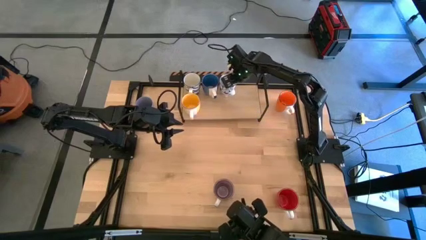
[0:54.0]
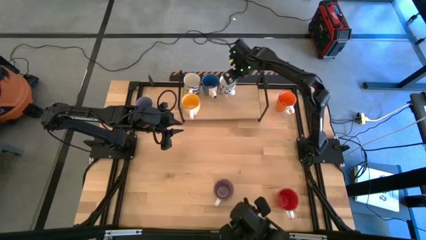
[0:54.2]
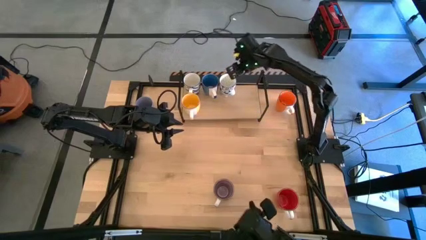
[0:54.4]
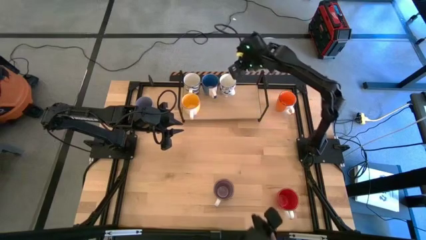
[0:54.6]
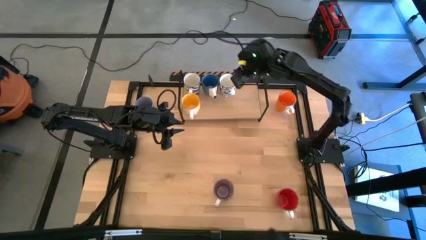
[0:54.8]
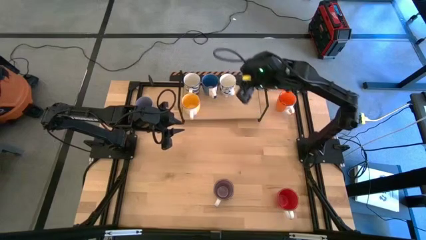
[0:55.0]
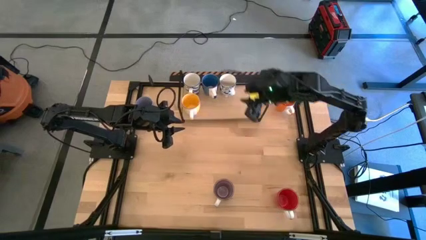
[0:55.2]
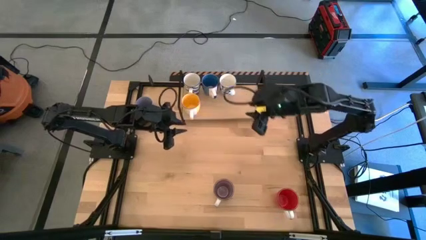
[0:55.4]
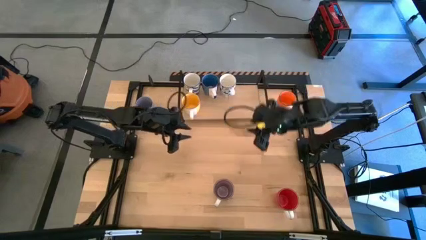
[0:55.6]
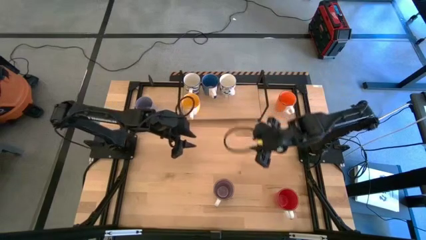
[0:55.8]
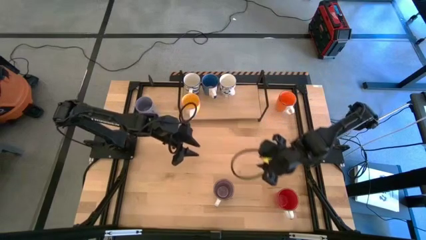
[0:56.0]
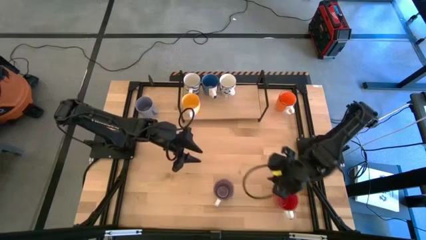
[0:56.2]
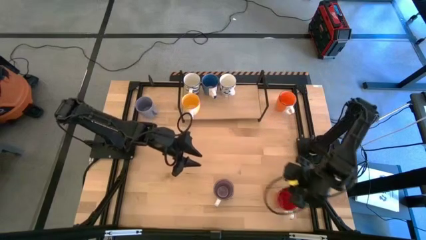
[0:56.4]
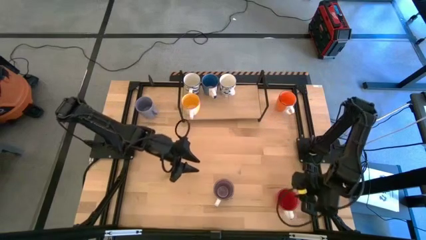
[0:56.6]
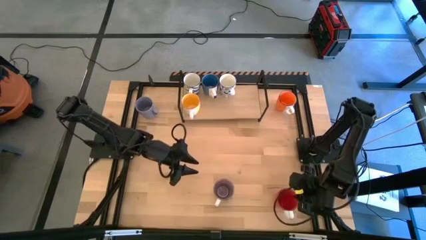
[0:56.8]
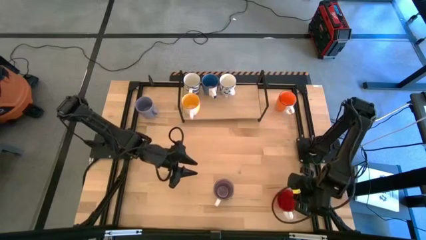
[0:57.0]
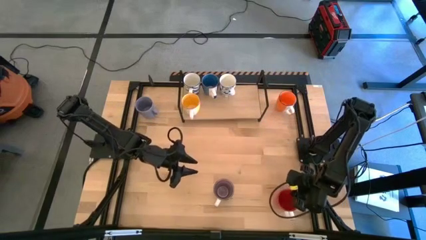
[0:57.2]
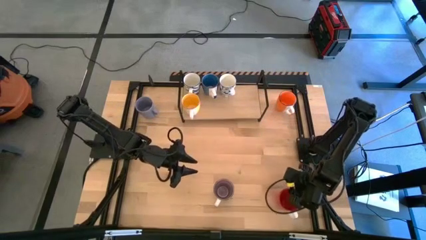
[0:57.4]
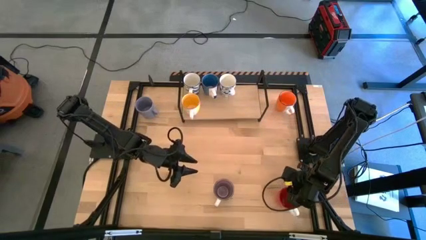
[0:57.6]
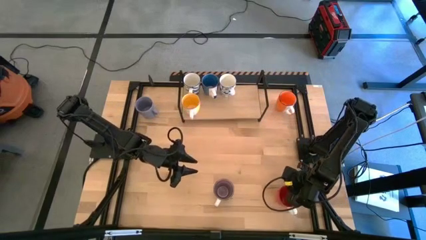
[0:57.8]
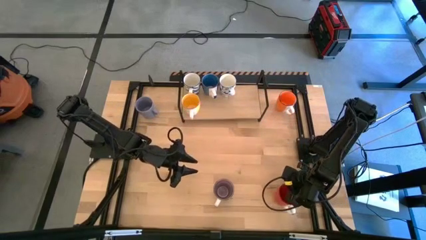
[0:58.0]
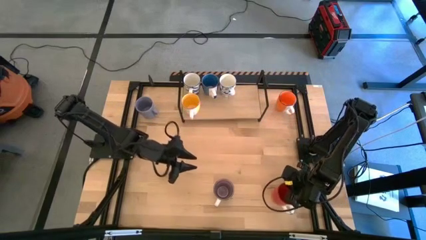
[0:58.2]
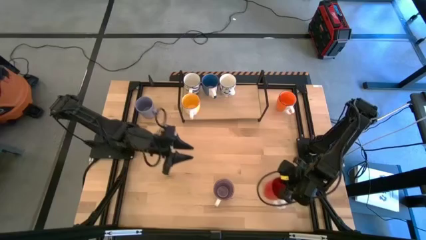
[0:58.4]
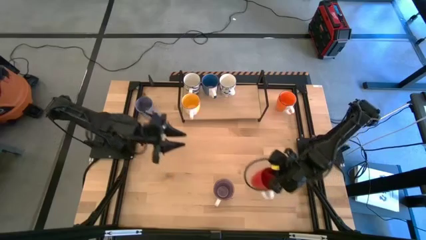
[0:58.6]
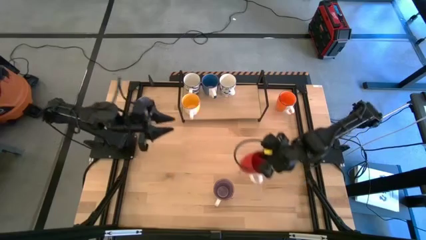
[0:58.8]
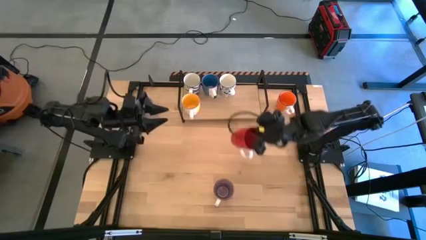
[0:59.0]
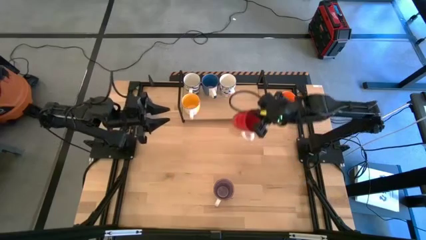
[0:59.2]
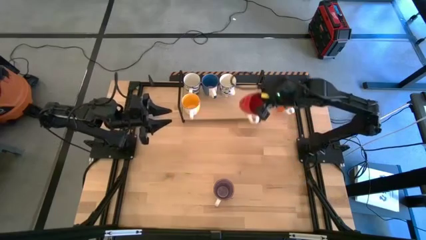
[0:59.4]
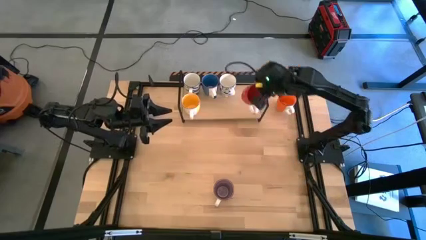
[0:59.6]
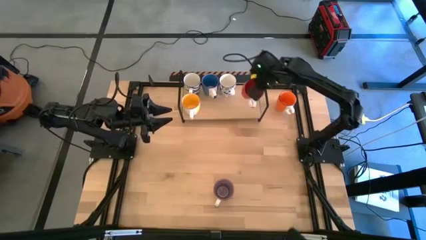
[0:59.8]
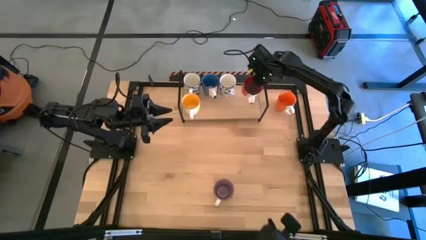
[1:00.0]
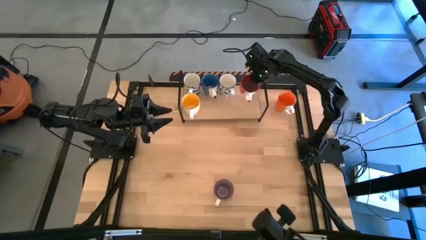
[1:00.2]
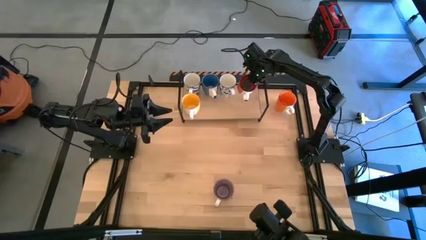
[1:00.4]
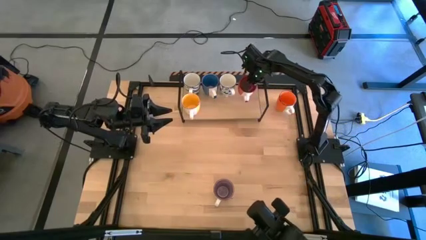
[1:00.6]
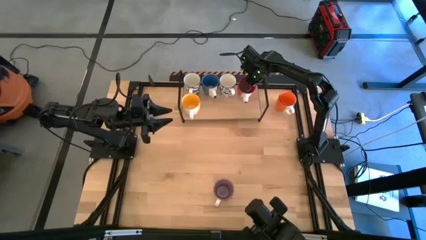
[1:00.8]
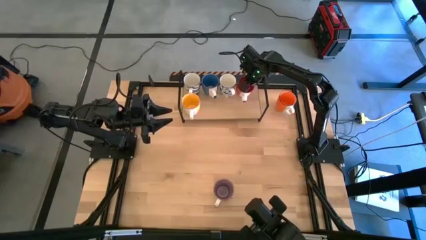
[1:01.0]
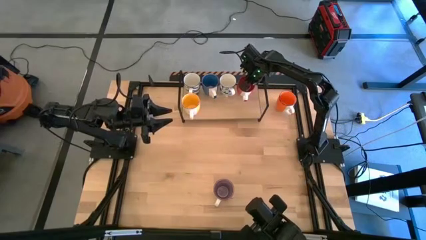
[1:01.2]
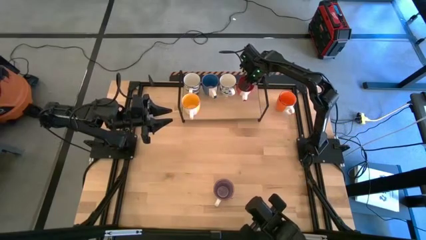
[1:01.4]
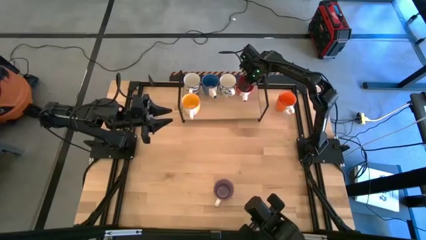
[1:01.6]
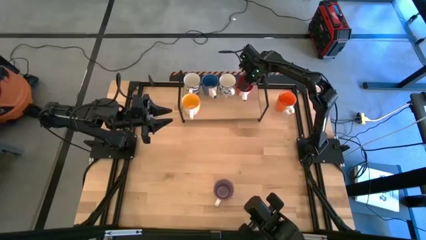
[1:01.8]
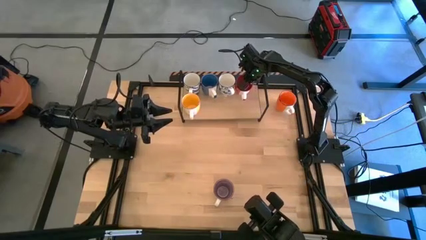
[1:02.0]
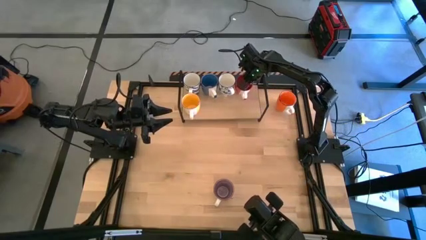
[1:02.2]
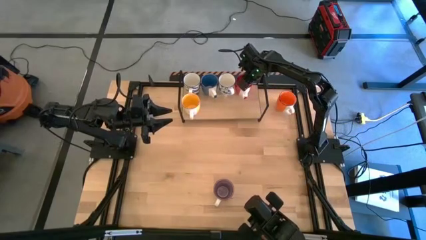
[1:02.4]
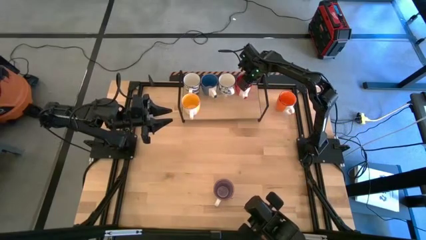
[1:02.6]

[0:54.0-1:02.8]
Task: Place coffee mugs
Put the red mug on the shelf

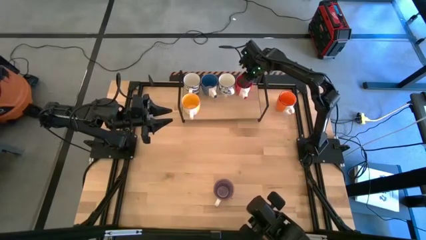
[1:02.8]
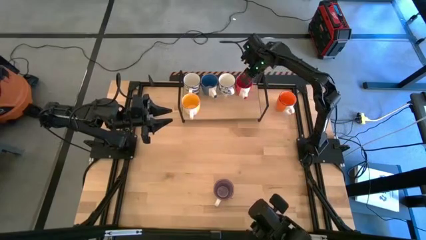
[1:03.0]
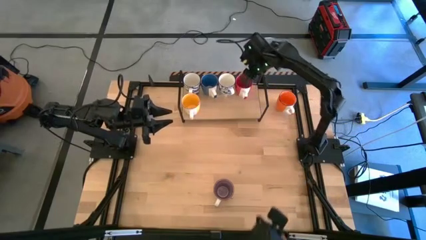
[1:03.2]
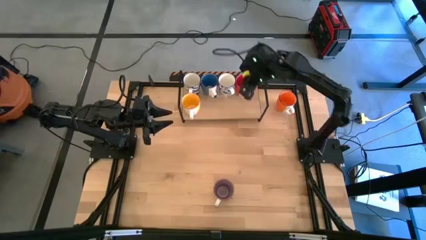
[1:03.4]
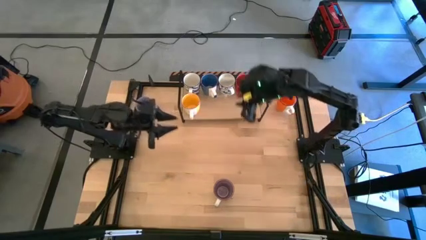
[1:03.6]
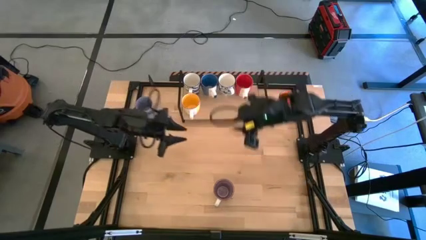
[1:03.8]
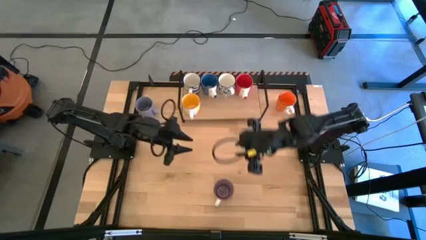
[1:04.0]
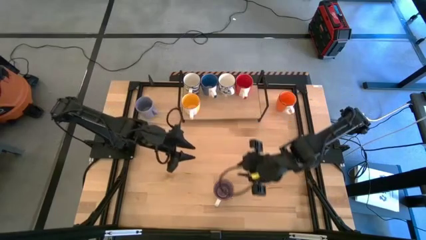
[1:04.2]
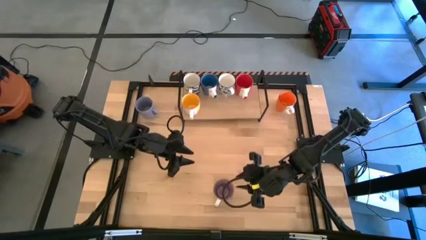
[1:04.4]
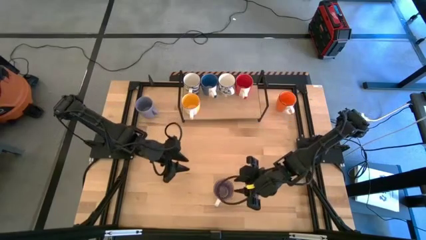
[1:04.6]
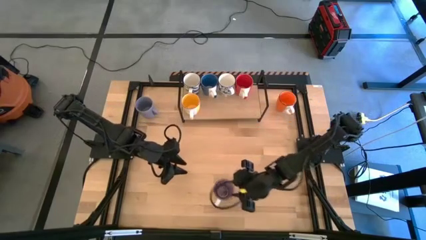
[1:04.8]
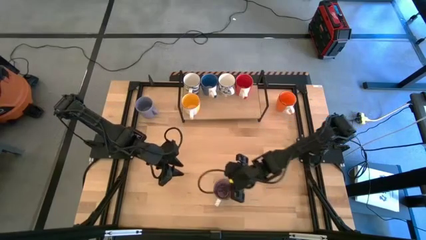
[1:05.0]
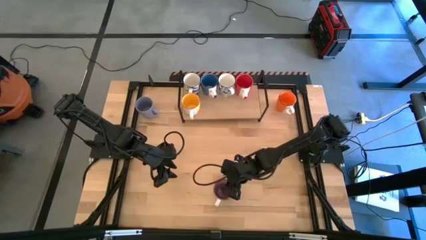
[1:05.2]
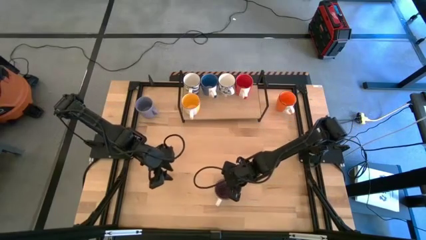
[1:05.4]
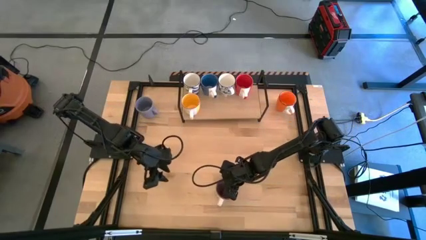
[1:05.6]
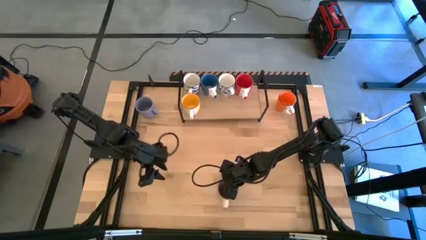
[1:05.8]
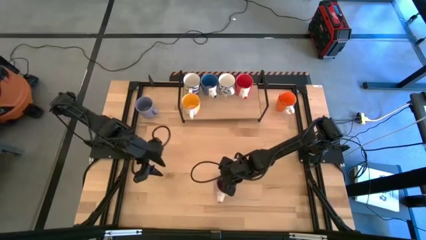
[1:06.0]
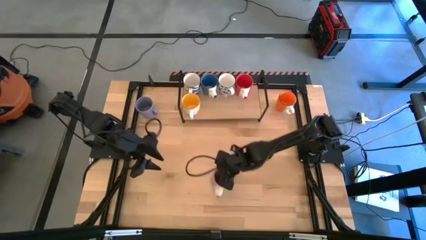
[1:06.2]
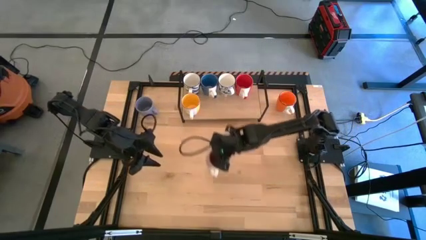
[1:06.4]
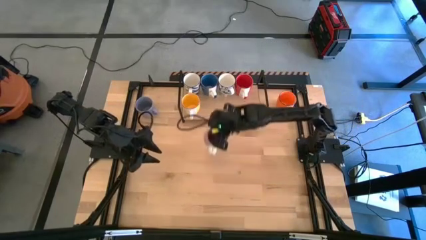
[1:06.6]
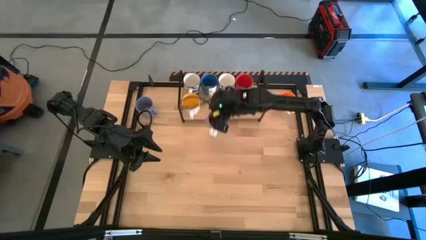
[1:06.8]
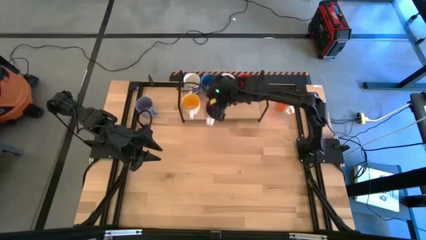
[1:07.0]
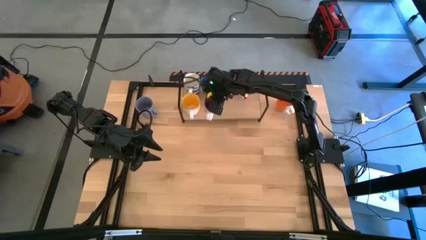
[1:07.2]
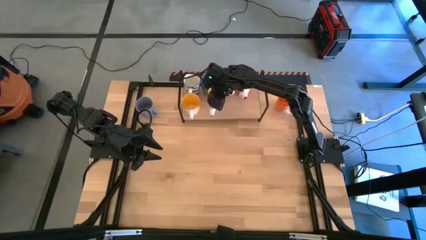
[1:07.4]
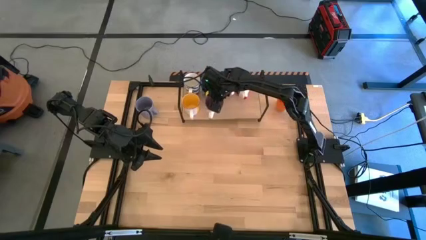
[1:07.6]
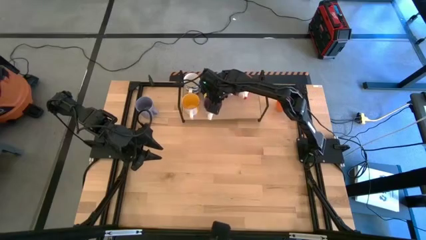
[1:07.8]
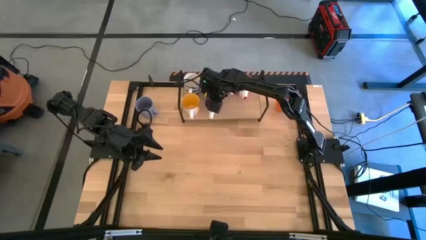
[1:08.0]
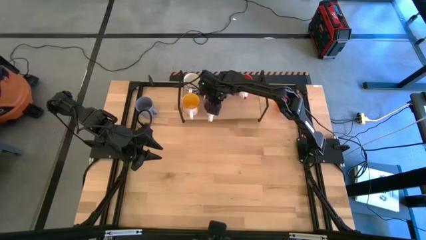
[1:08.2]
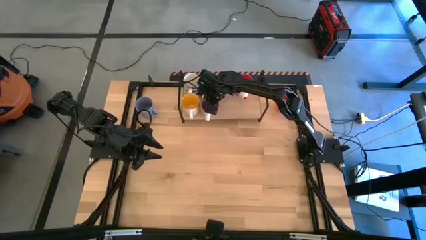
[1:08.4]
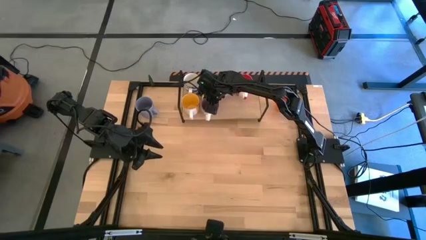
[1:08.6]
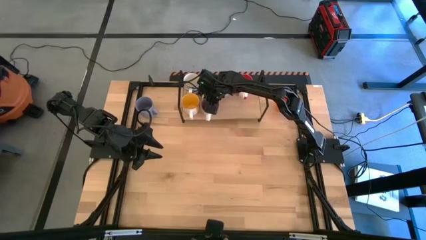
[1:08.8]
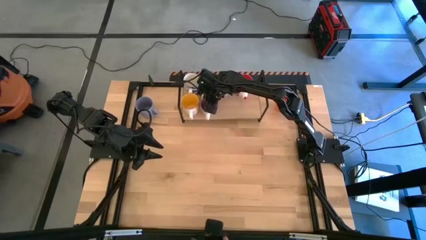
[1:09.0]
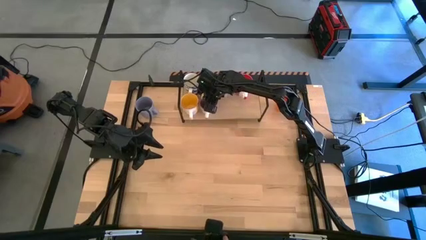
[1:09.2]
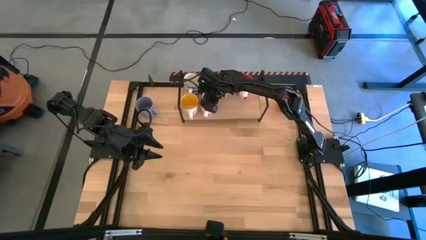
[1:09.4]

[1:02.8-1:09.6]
Put the violet mug on the shelf
